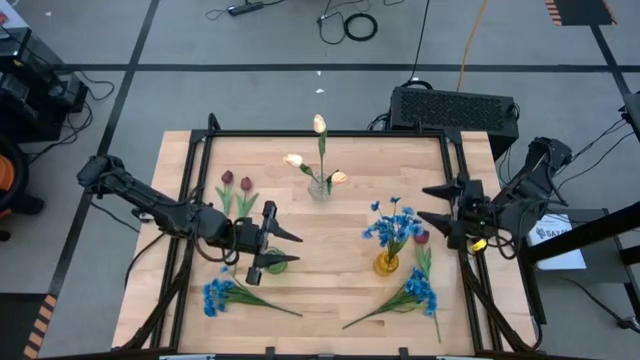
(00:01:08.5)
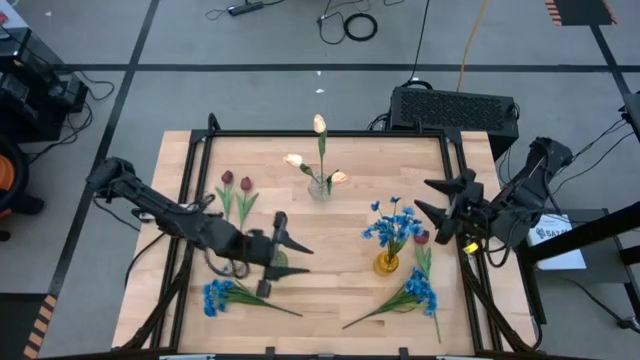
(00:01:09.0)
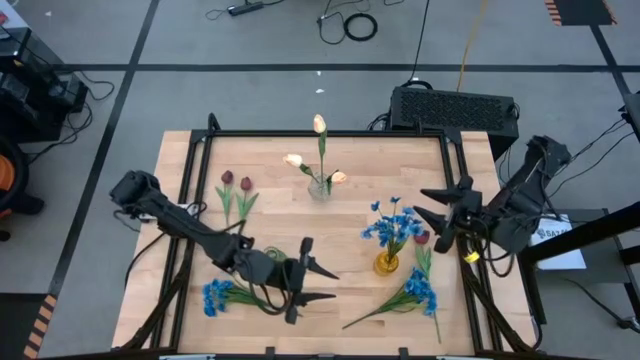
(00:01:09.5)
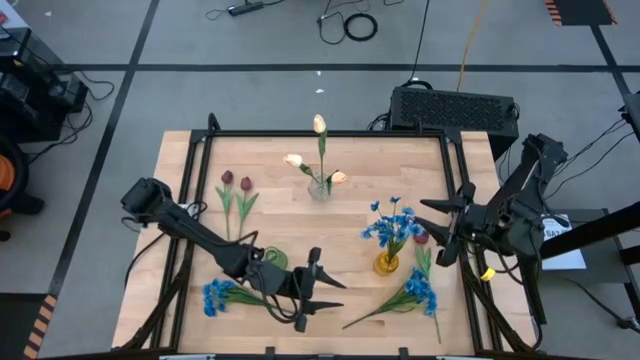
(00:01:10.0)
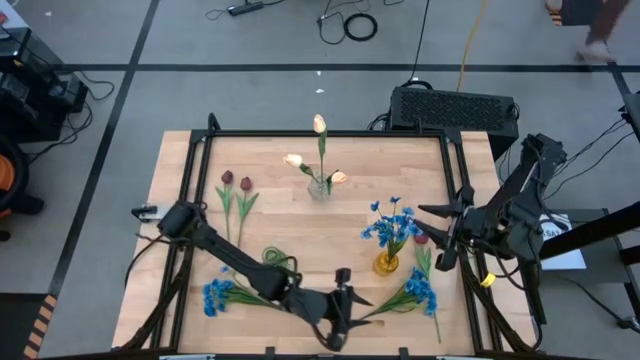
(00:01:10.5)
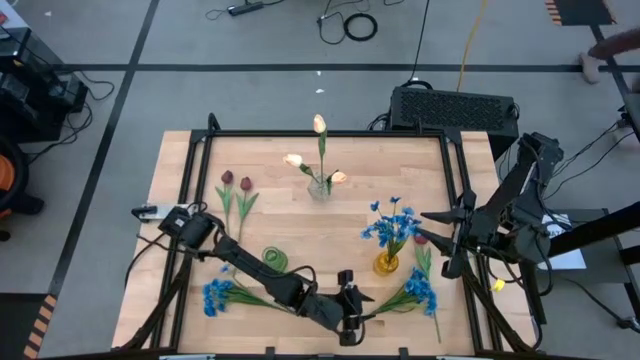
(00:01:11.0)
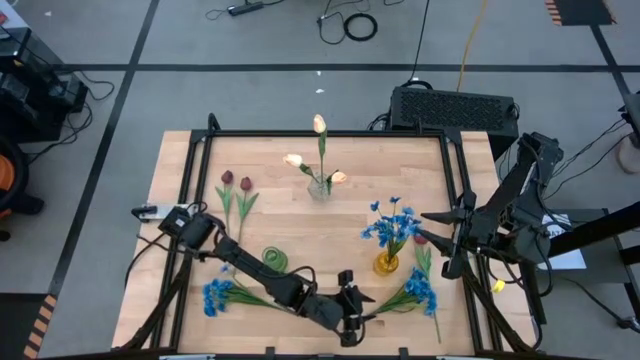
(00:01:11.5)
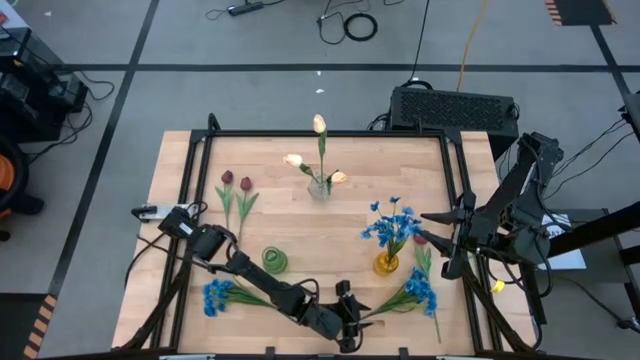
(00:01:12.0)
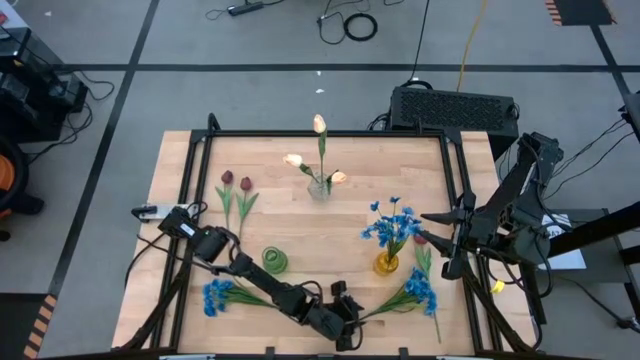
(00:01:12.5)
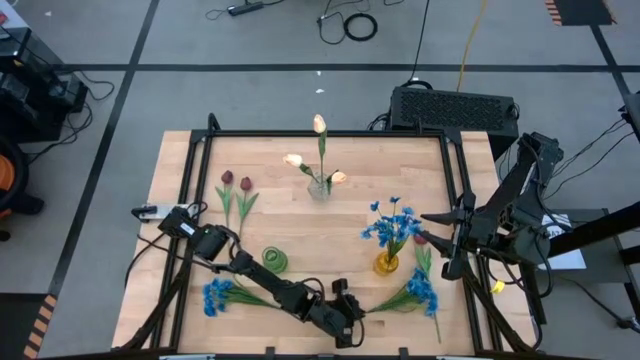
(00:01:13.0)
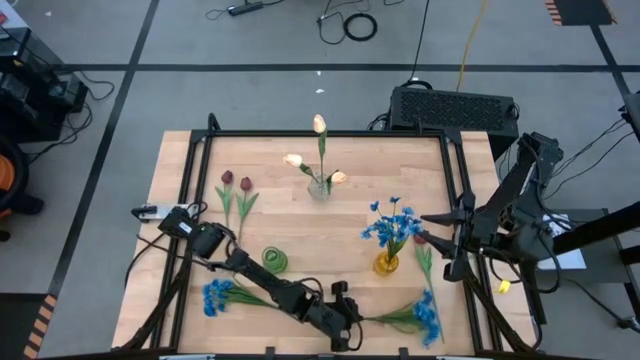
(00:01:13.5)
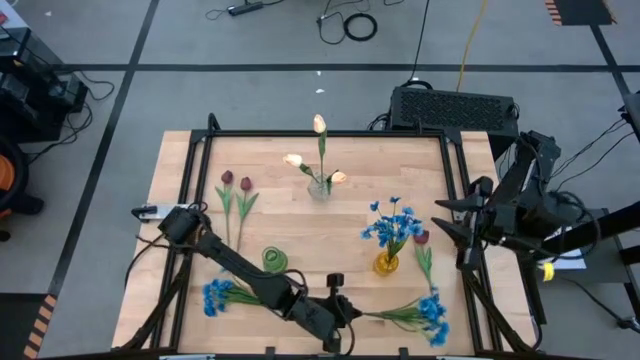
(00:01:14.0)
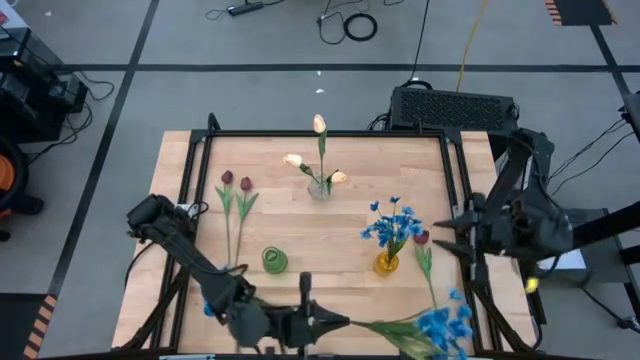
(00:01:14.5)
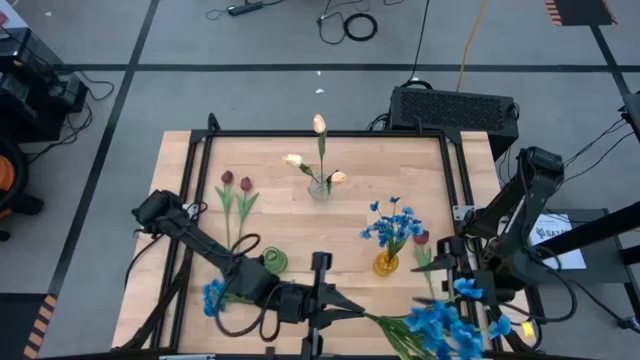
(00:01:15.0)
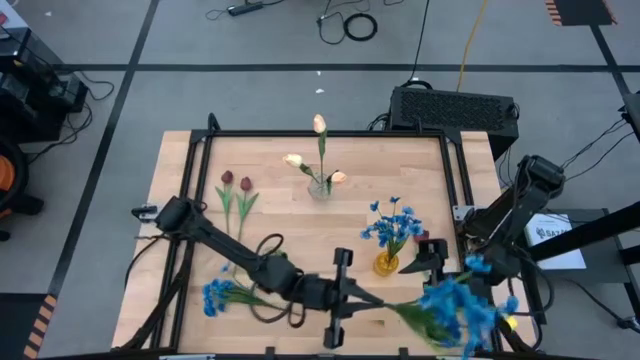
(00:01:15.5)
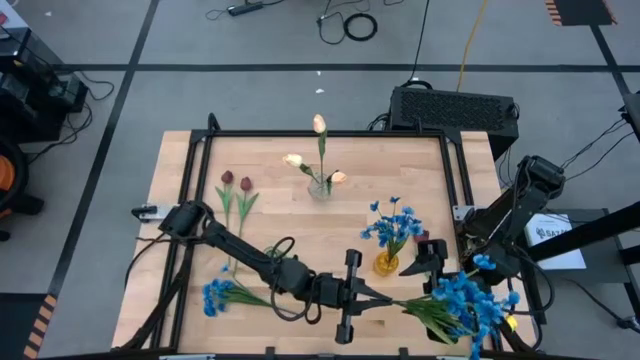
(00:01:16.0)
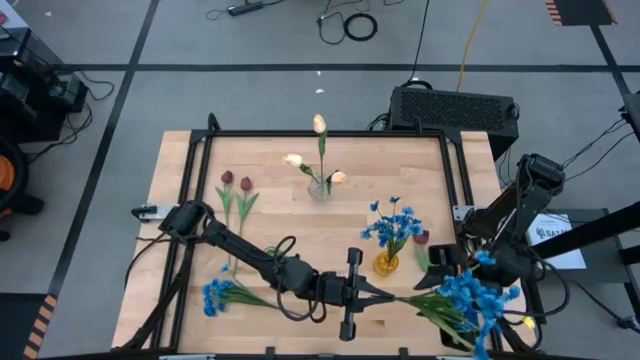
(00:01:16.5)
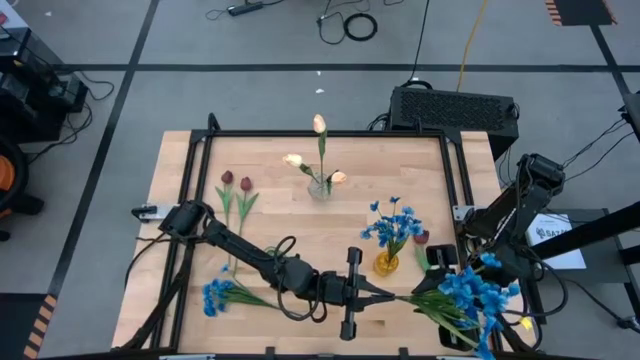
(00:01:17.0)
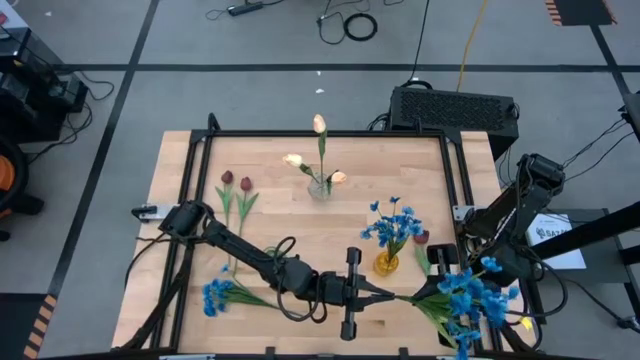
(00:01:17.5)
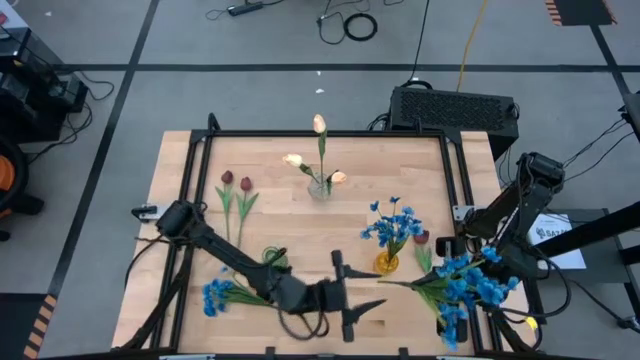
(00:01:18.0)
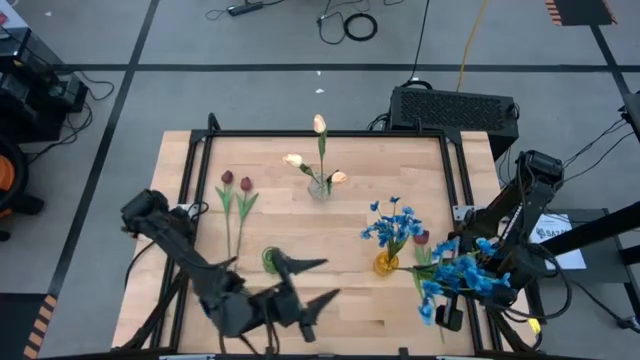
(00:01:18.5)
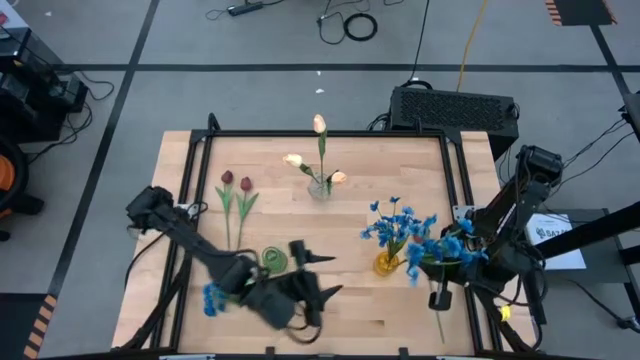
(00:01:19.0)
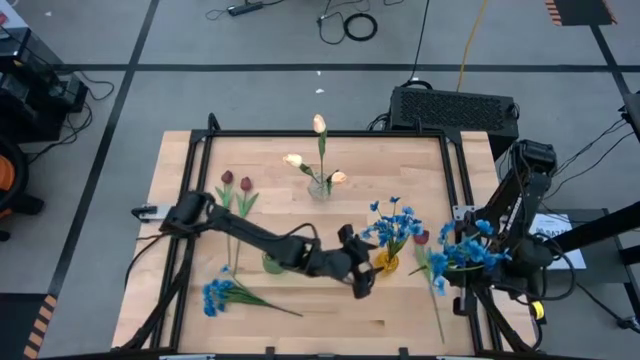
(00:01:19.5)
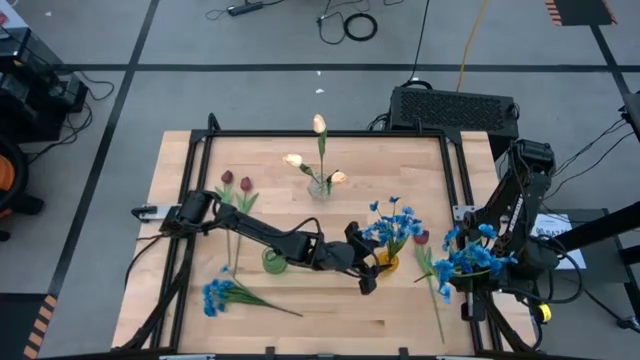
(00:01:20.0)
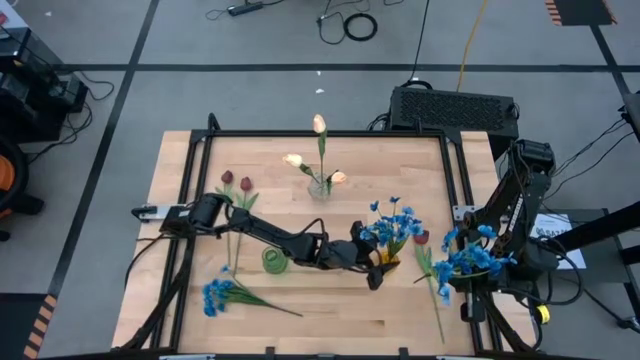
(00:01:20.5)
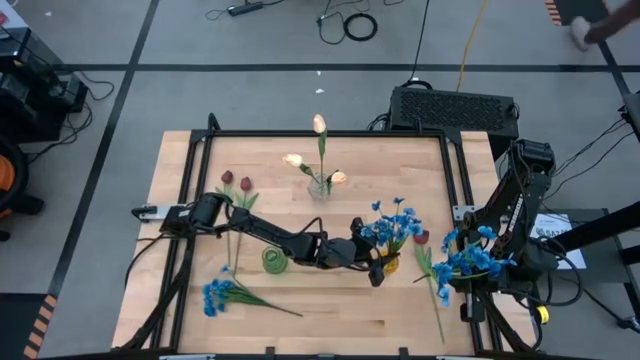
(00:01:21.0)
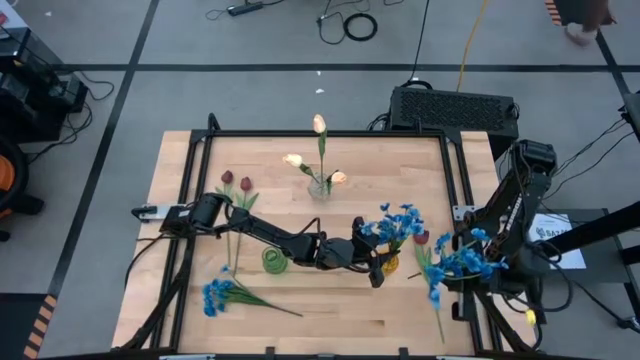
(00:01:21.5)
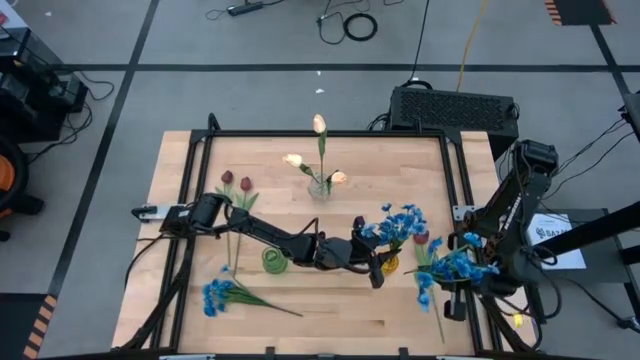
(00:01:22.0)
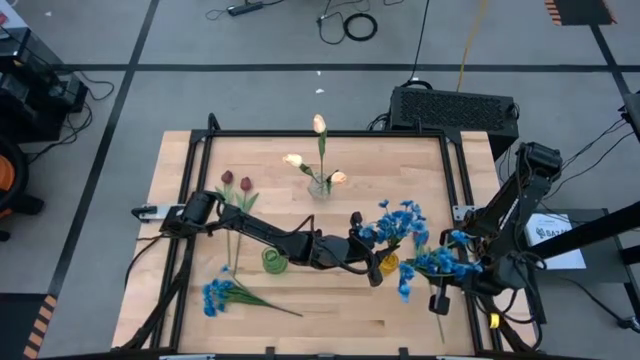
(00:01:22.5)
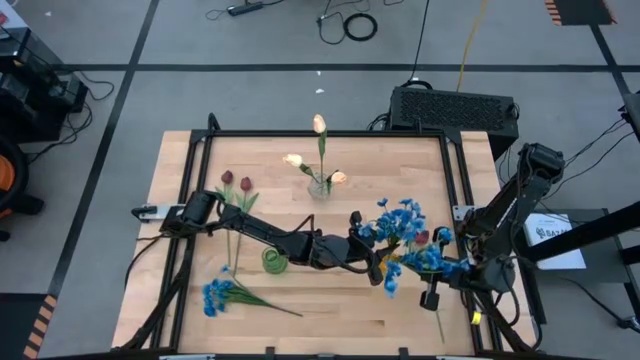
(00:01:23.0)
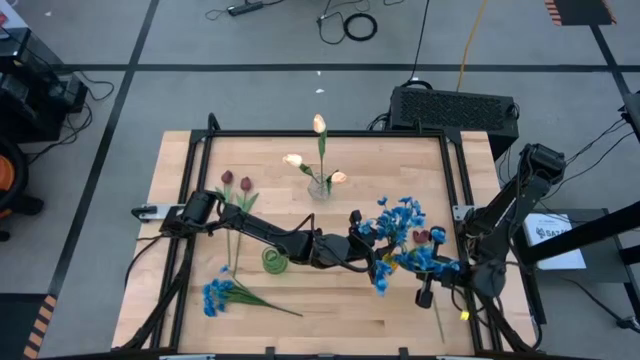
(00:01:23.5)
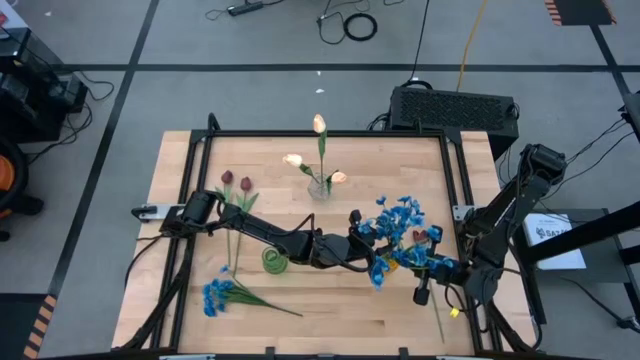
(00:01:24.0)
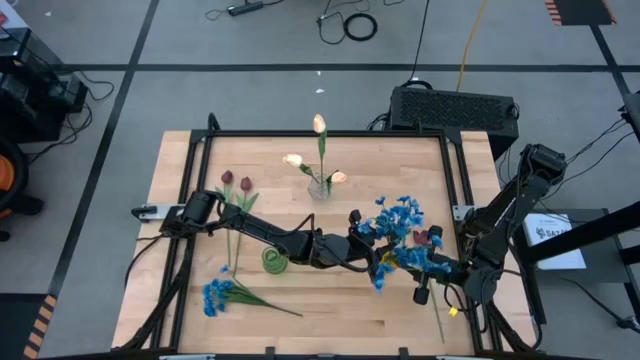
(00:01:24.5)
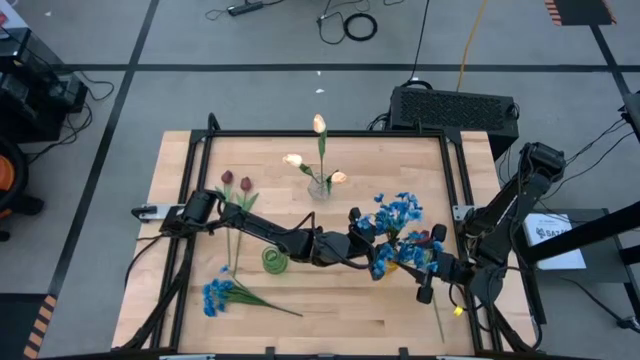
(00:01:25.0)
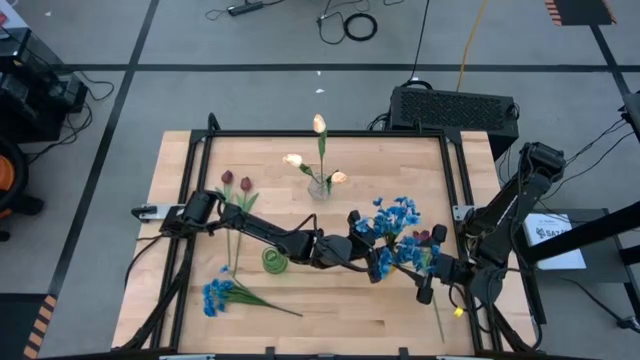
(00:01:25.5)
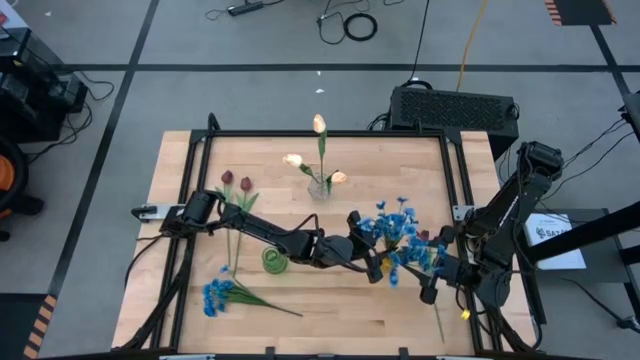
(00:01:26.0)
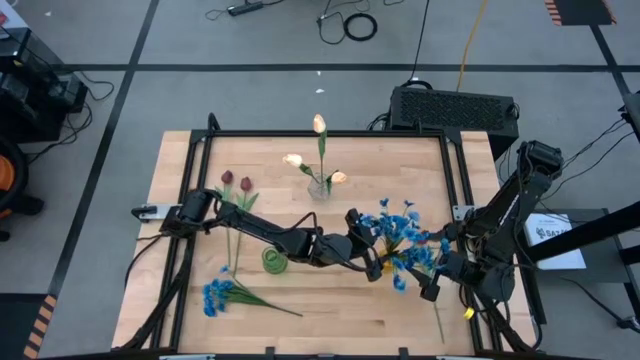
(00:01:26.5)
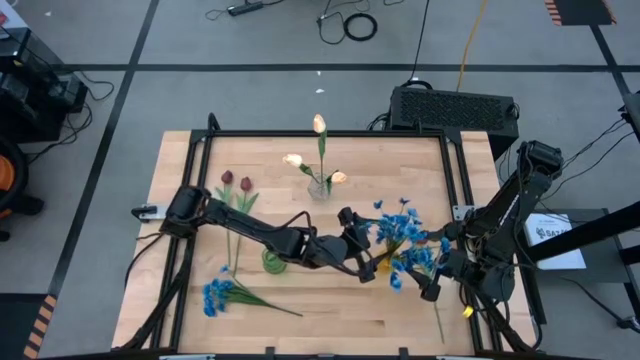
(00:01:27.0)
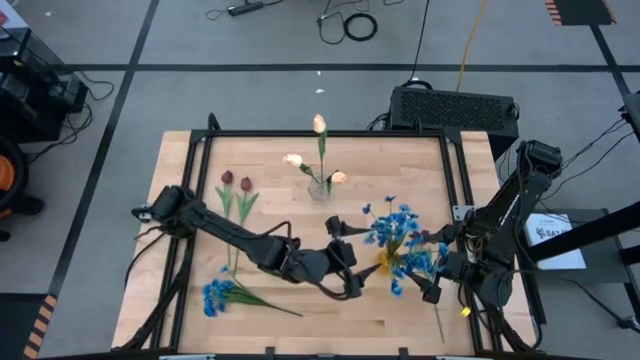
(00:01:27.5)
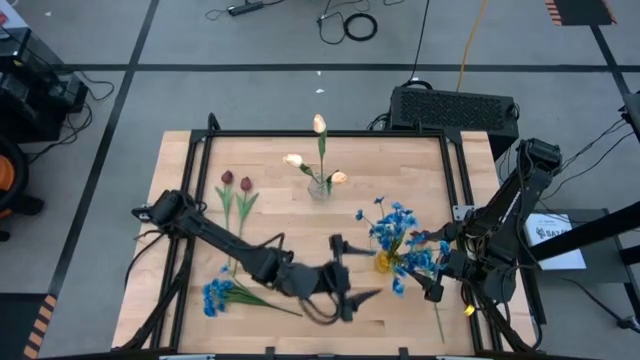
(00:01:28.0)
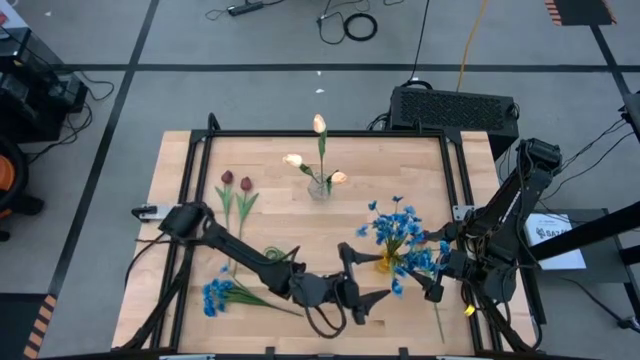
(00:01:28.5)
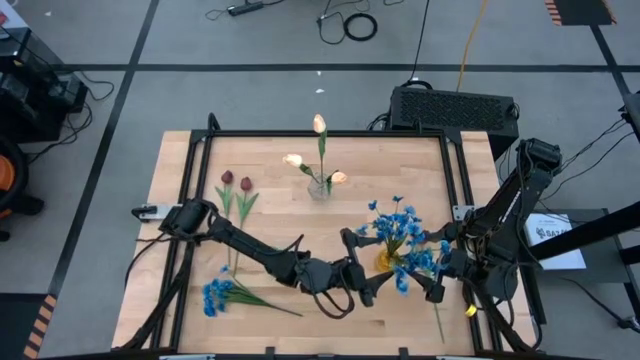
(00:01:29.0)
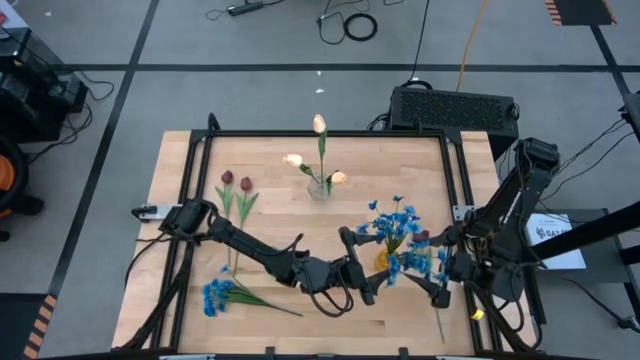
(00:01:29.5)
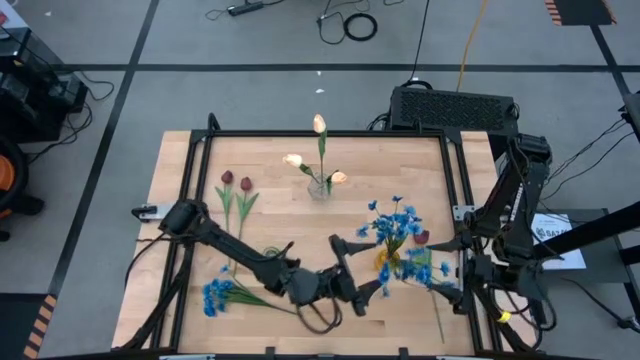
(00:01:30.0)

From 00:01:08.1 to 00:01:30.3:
Task: Sort flowers into vase by color
Put the right blue flowers into the yellow vase
